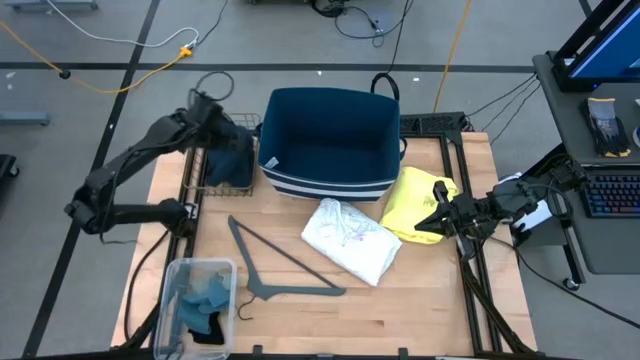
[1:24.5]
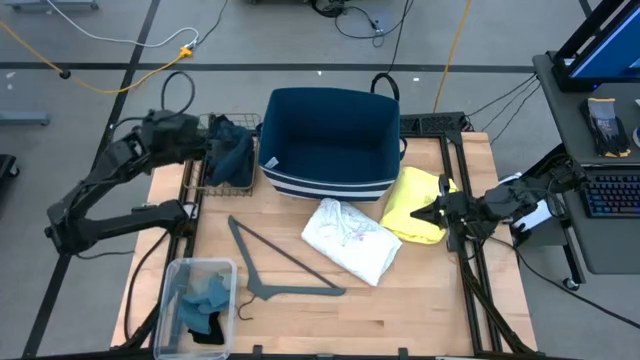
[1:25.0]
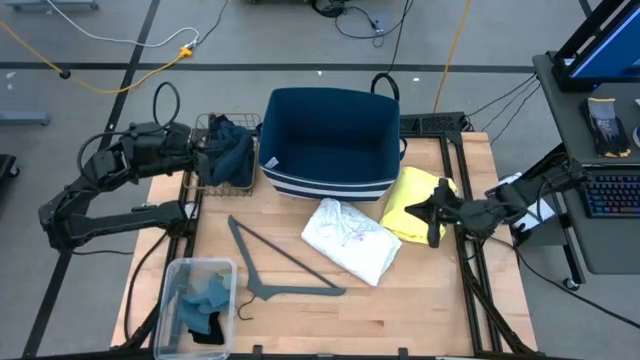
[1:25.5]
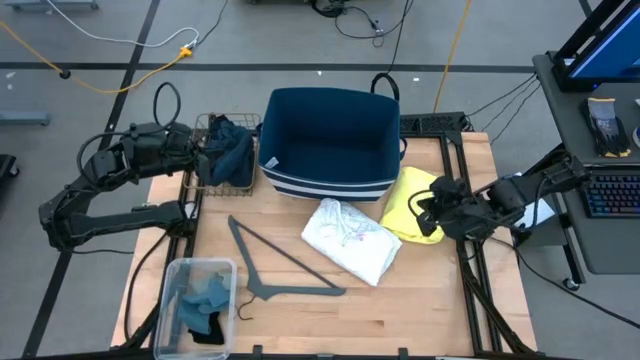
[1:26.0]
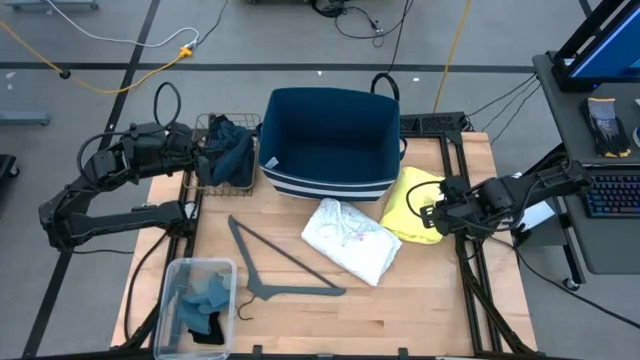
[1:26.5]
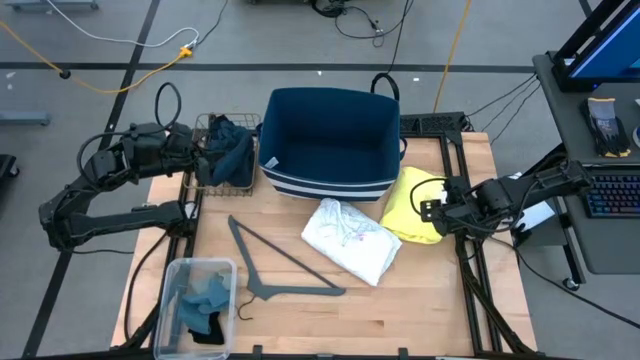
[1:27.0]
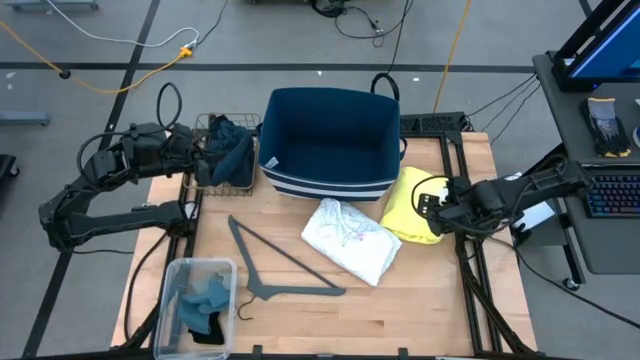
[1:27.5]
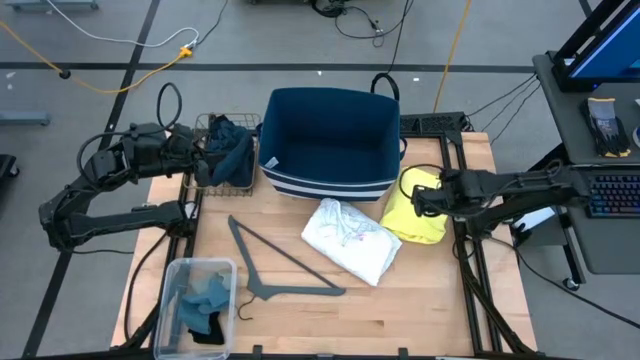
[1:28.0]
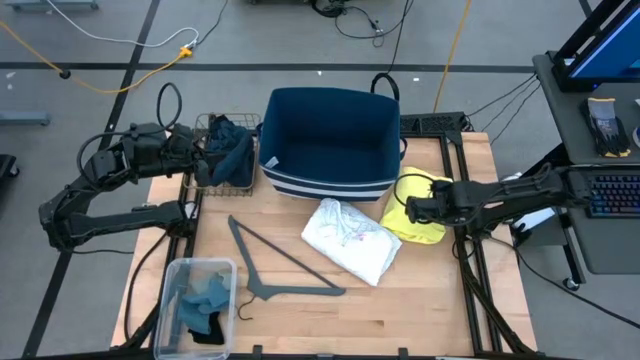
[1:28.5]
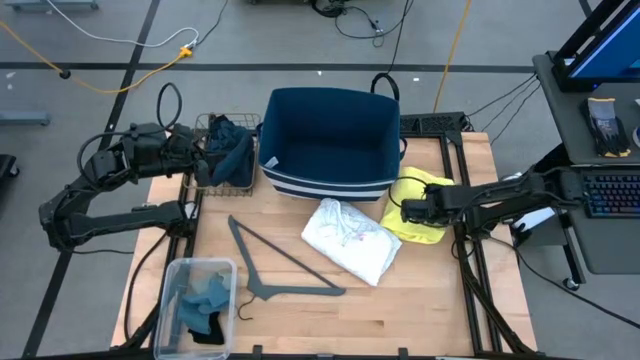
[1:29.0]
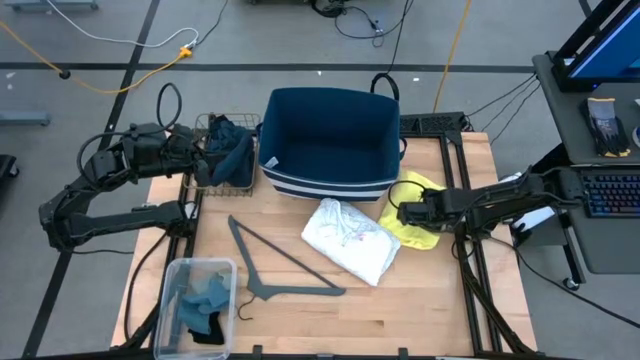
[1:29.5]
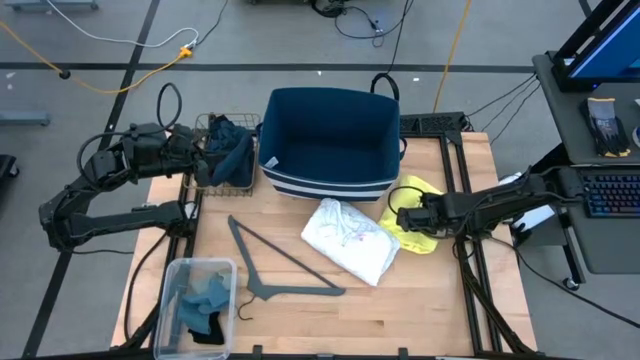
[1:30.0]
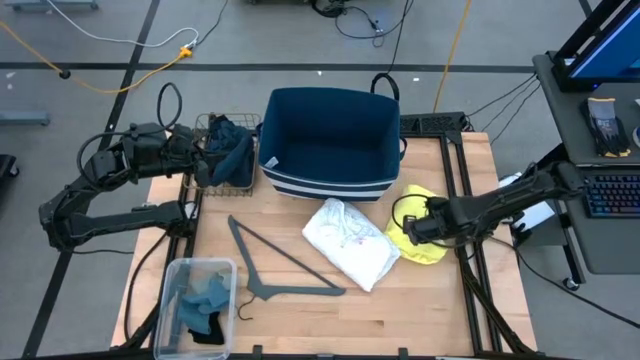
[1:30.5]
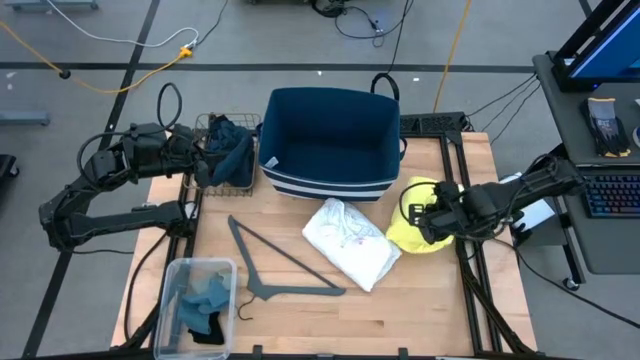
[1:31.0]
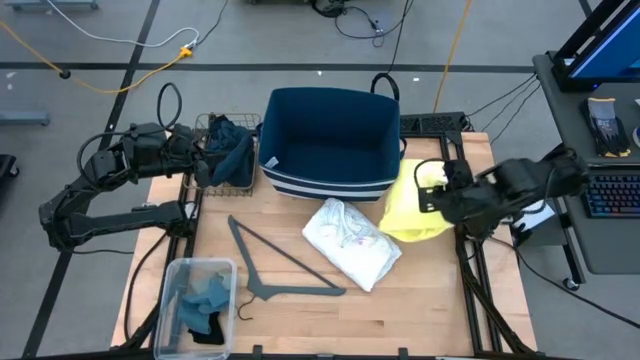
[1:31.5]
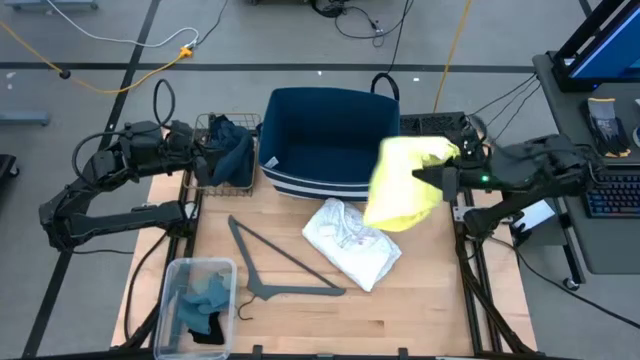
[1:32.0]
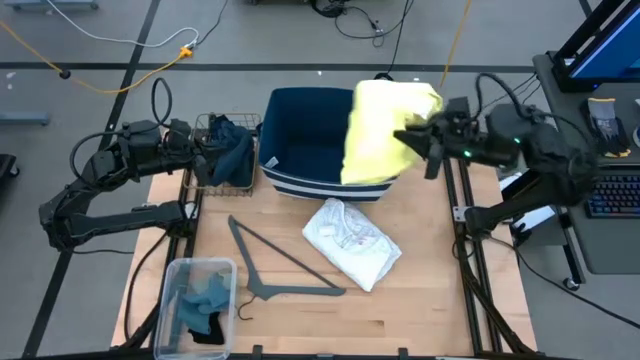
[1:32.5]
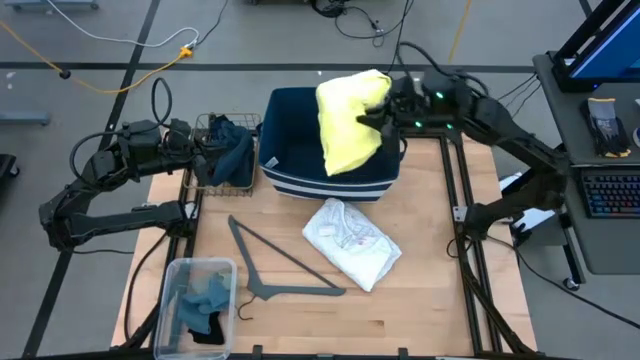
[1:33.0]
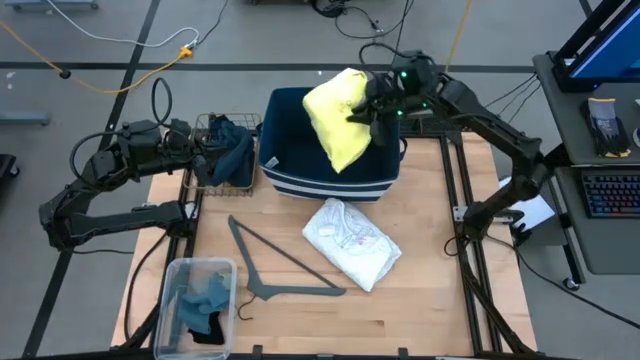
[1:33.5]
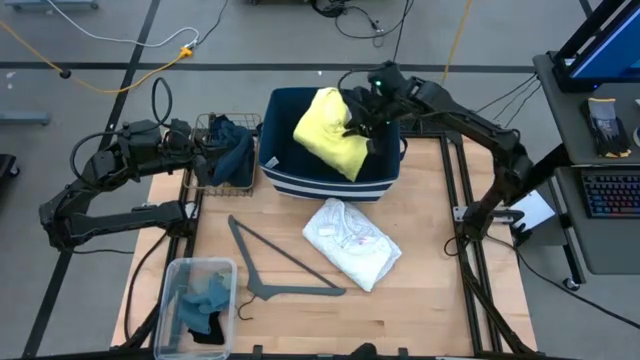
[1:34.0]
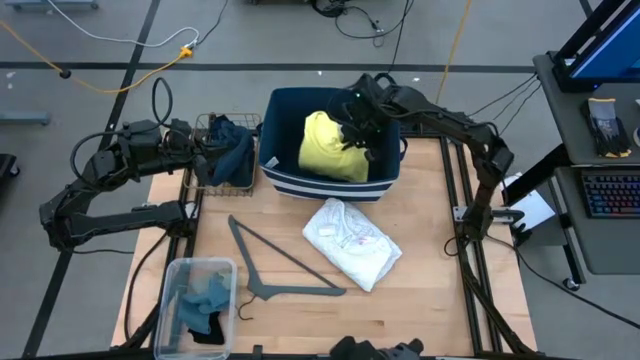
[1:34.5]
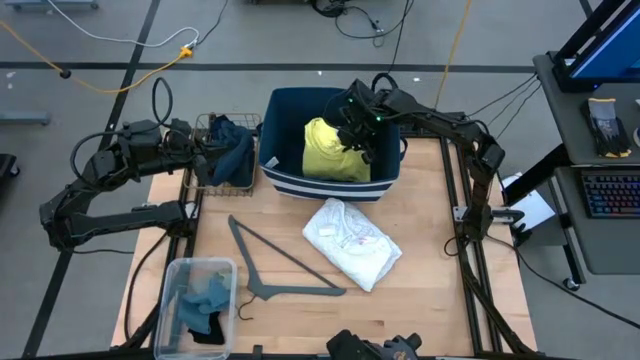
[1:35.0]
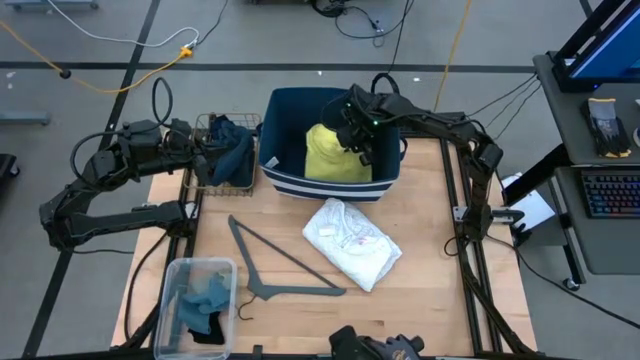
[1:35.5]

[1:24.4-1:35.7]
Task: Pick & Place Cloths
Put the yellow shirt into the blue bin

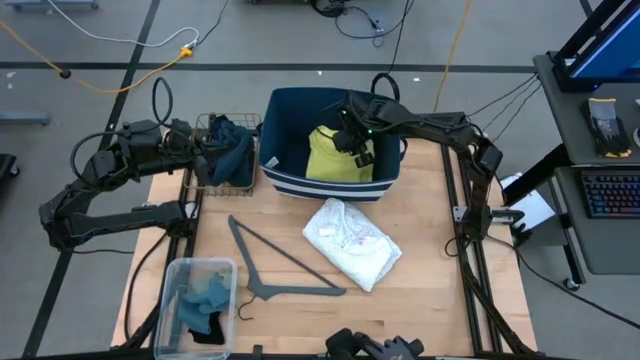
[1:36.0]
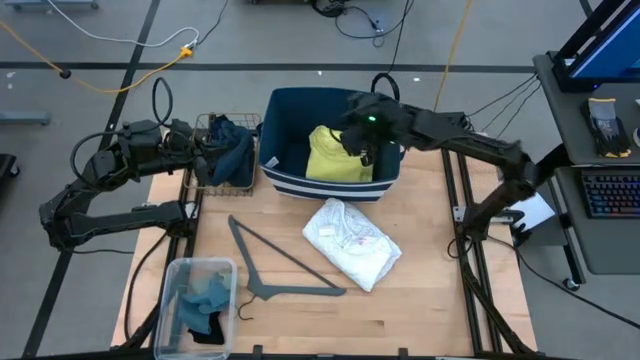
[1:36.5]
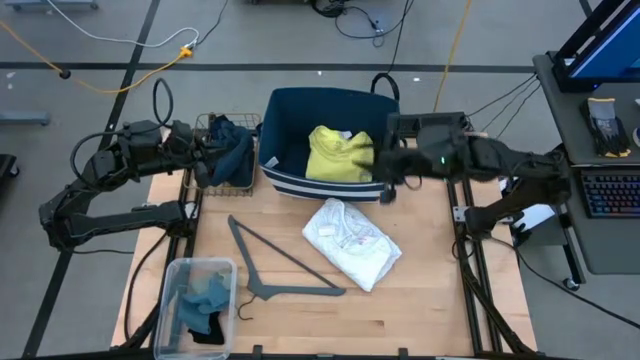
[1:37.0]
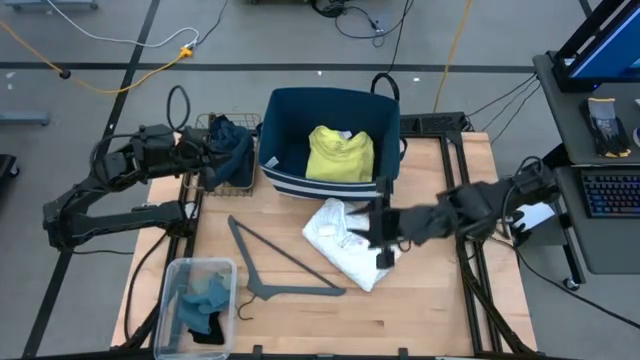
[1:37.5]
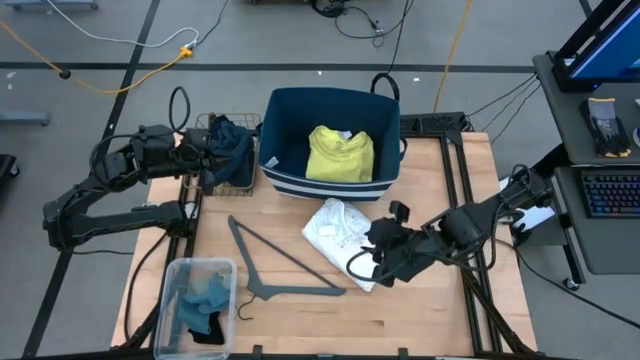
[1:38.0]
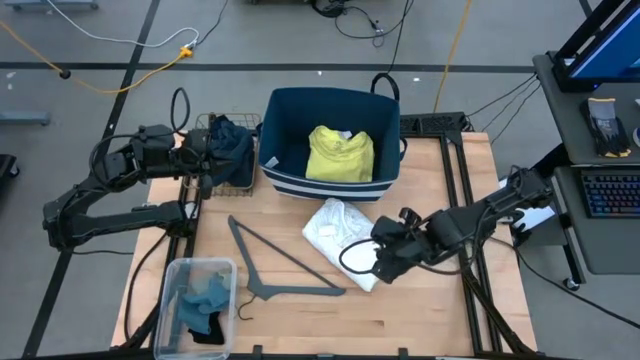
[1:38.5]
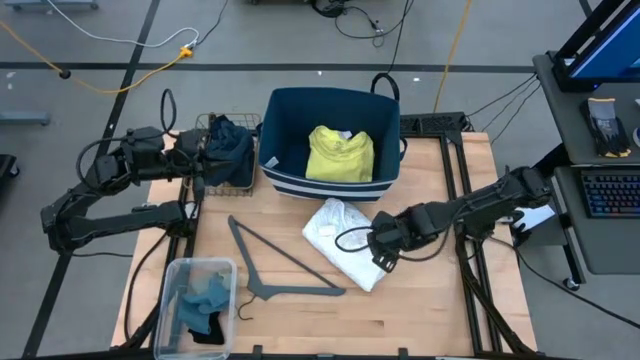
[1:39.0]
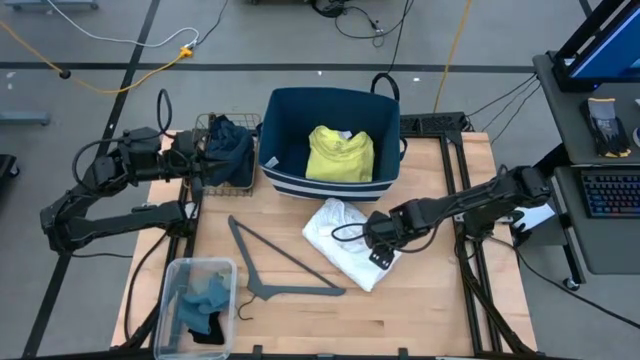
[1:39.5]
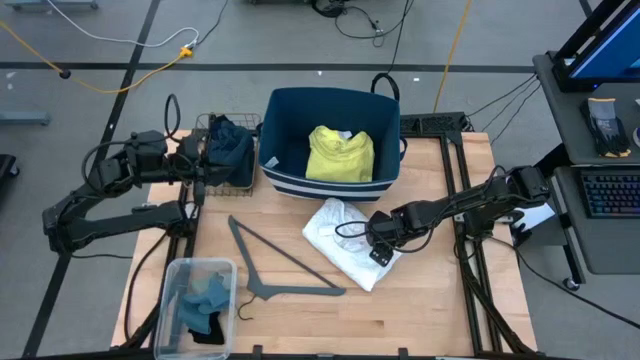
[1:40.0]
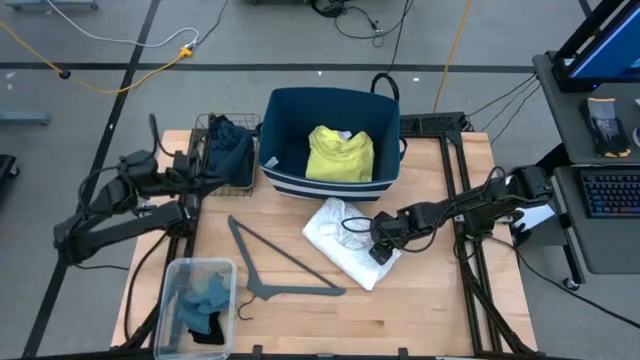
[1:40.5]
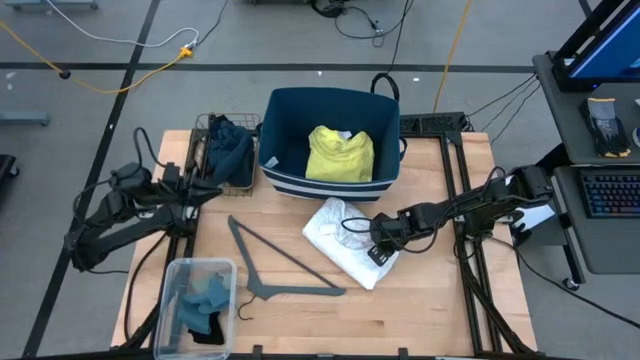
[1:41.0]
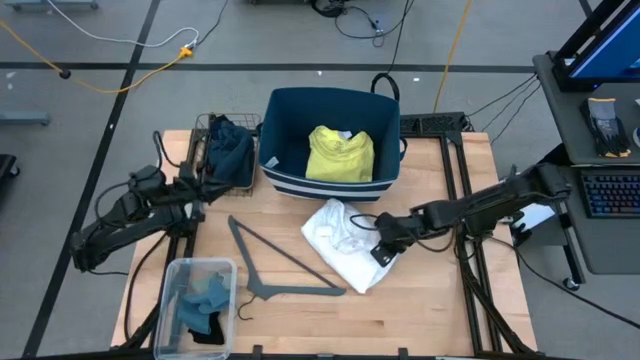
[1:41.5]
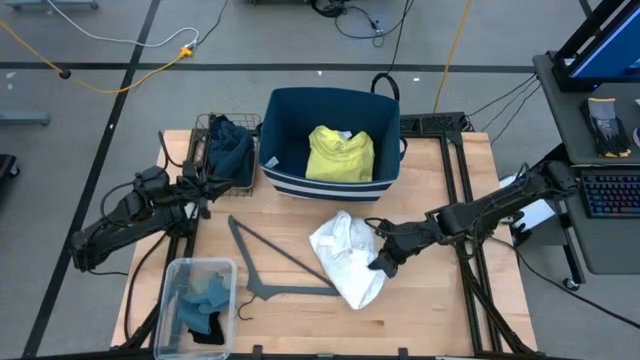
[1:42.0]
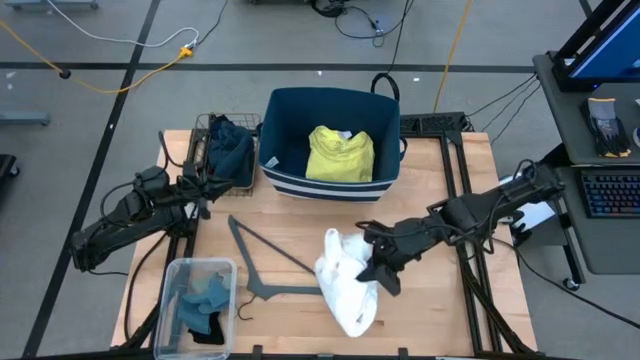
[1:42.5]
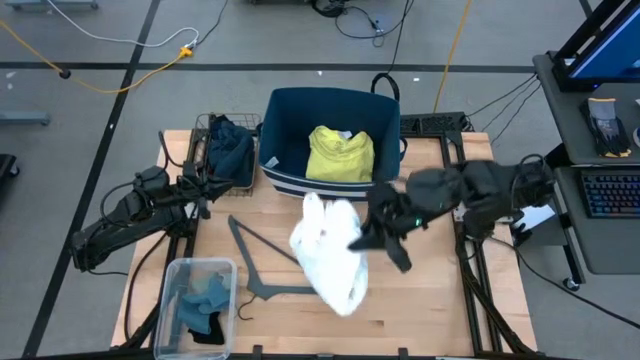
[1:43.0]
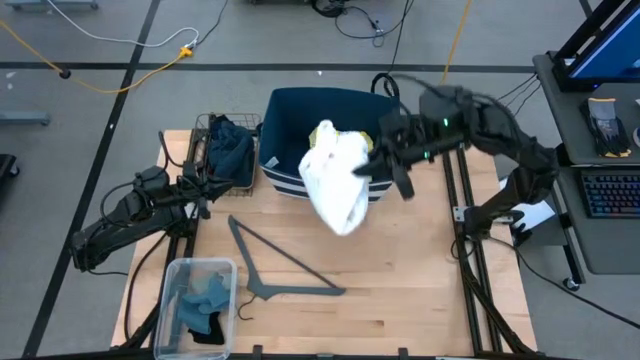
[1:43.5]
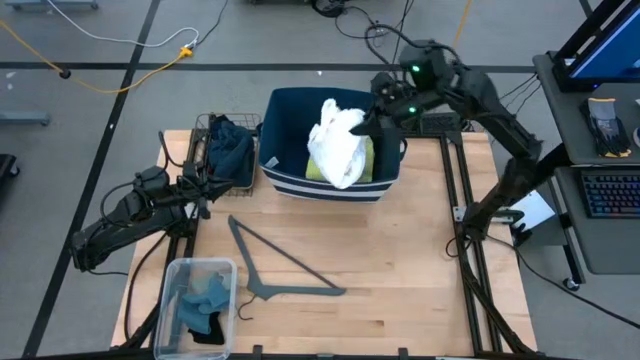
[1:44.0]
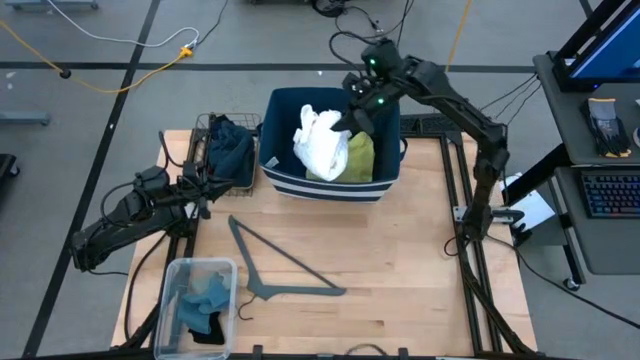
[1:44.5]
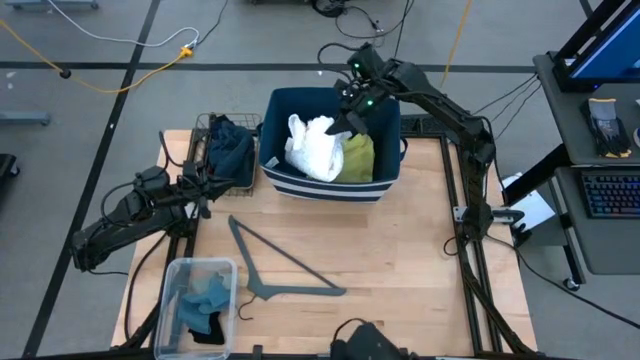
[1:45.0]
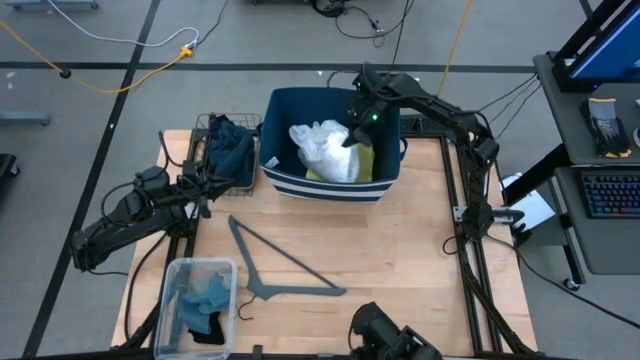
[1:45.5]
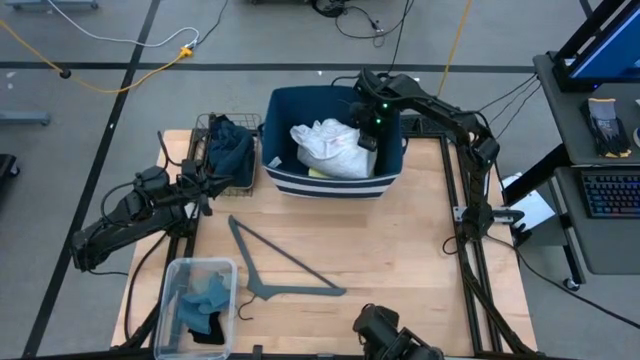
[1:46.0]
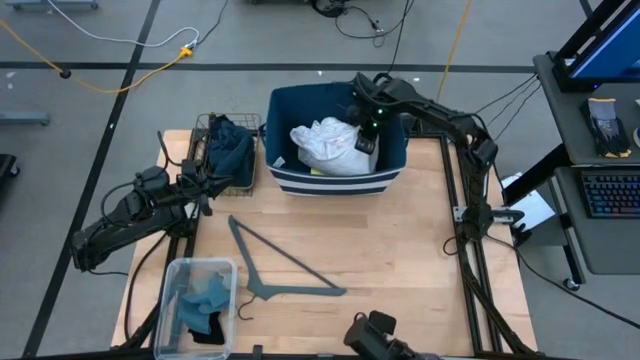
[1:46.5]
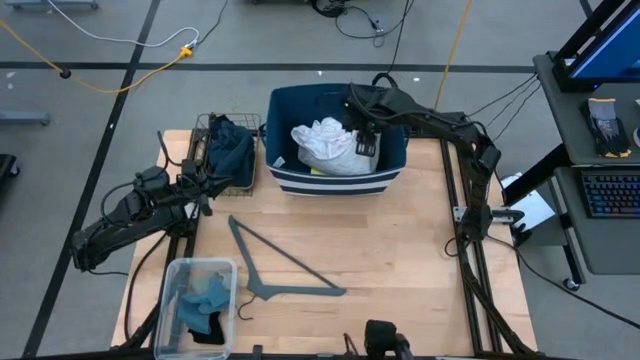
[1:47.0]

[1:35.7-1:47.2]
Put the white shirt into the blue bin
